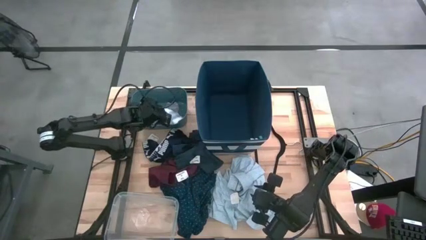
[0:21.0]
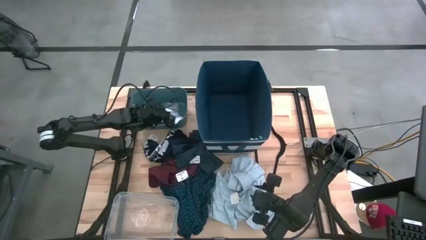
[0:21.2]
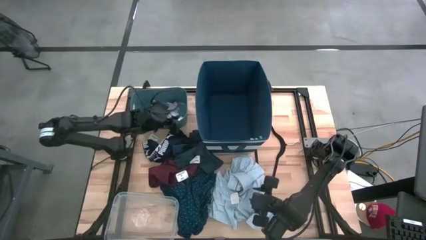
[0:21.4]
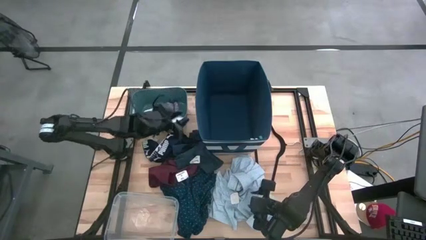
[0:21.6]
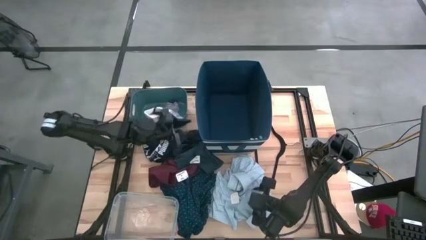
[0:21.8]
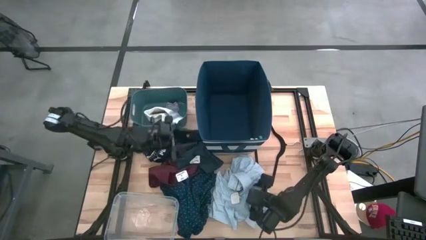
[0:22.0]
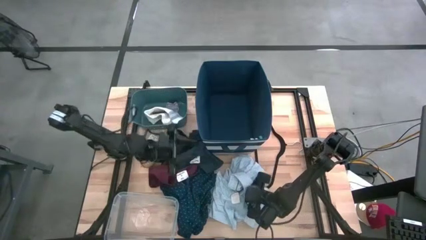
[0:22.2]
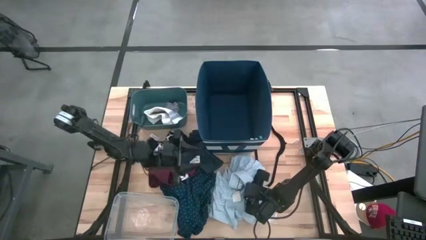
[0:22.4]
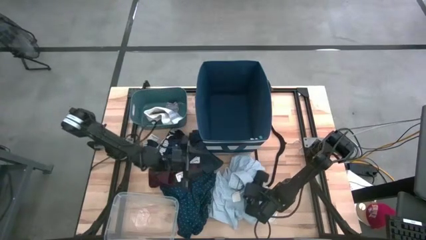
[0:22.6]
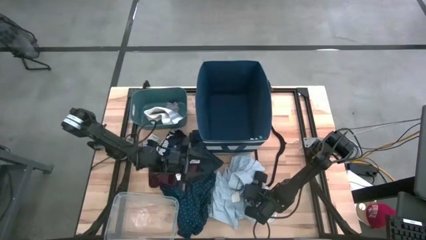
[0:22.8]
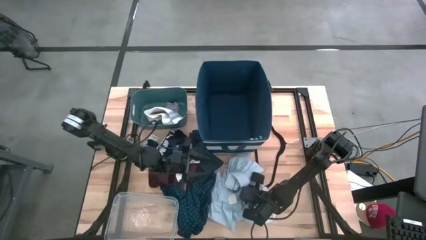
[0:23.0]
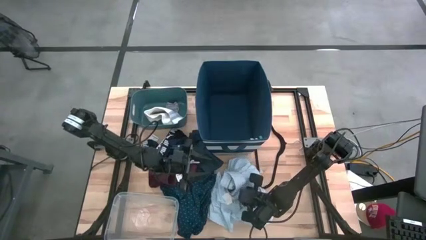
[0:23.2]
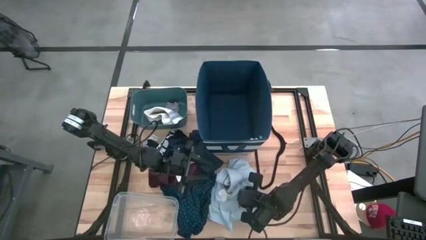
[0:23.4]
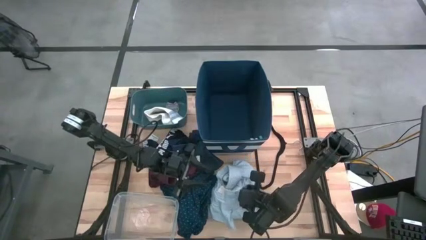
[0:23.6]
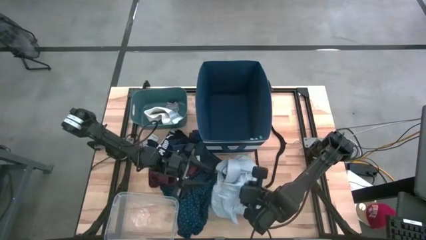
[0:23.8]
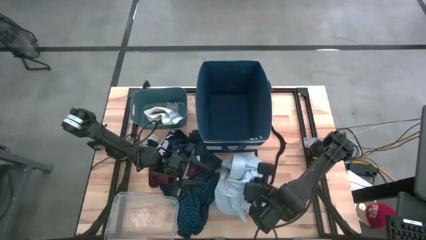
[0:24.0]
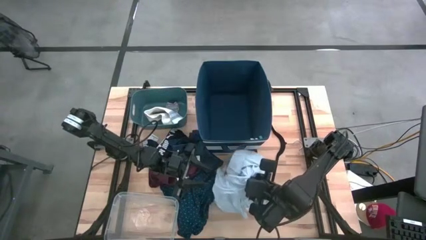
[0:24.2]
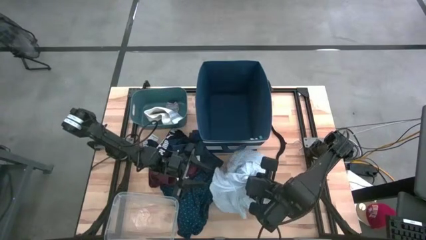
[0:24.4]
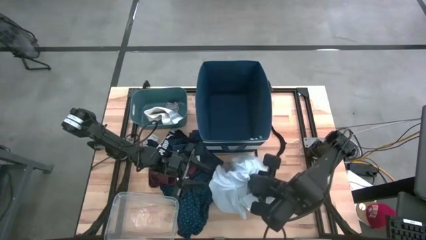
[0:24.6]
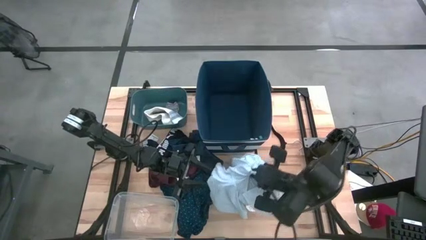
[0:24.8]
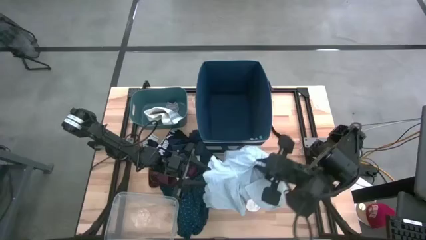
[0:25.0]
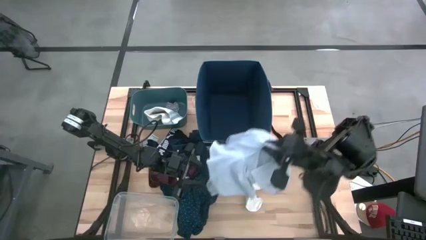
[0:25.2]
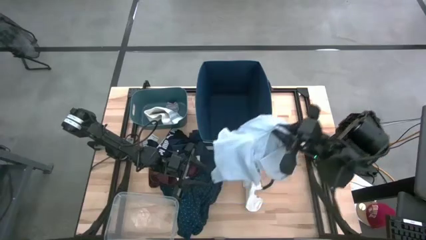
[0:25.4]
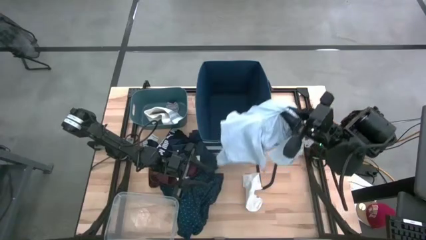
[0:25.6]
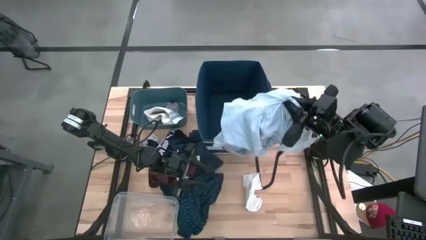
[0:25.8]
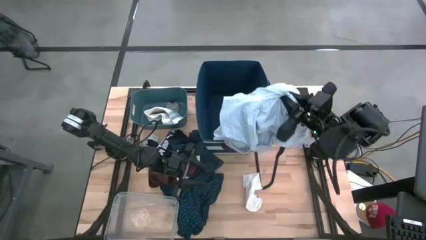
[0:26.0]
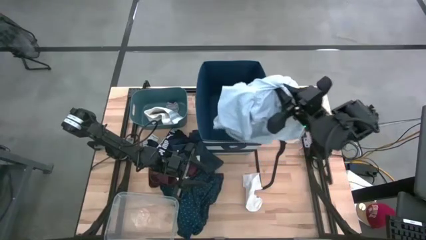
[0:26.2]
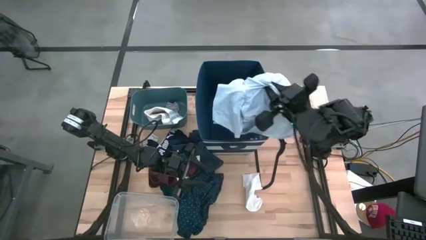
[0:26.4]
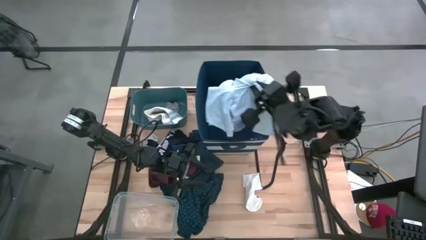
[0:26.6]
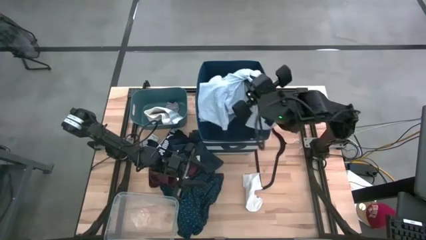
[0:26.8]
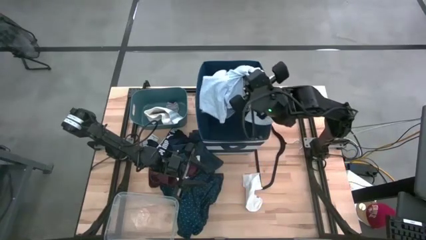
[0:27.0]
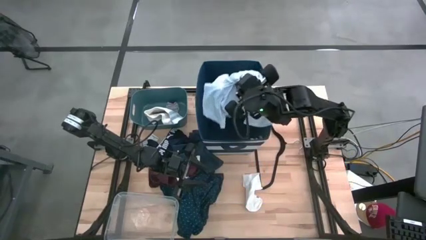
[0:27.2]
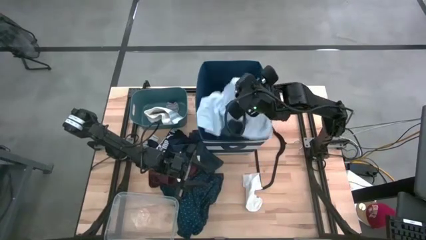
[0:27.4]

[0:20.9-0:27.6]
Task: Pick & Place Cloths
Put the light blue polo shirt into the blue laundry organizer

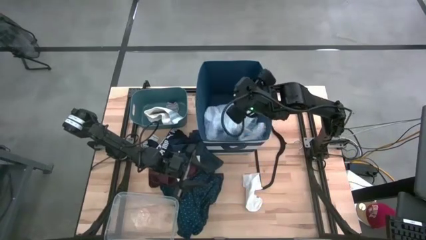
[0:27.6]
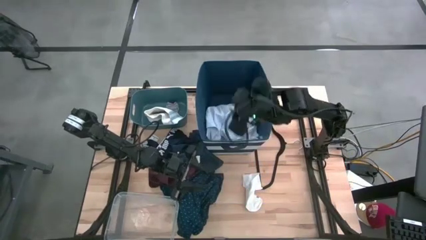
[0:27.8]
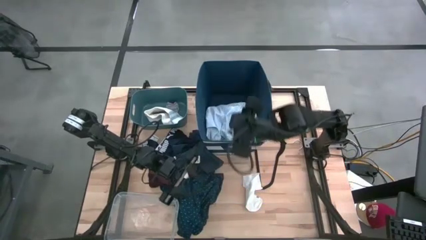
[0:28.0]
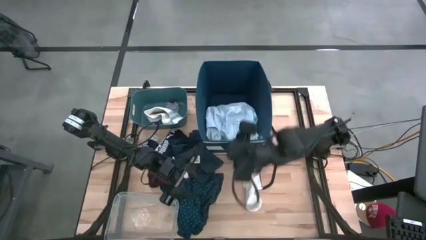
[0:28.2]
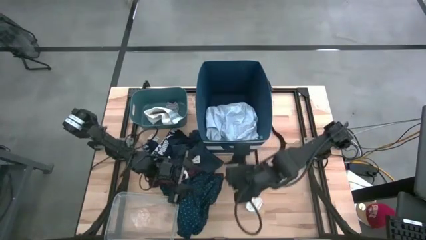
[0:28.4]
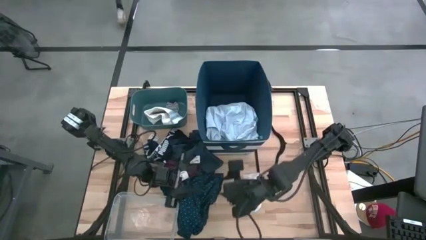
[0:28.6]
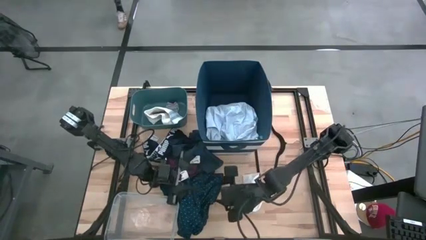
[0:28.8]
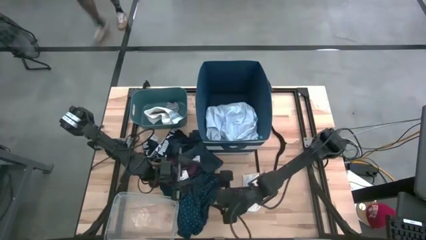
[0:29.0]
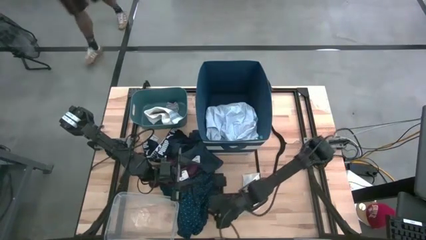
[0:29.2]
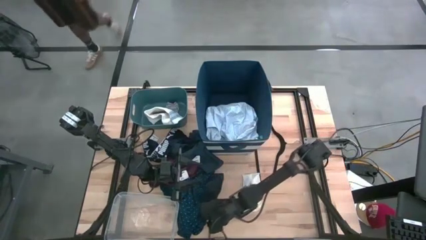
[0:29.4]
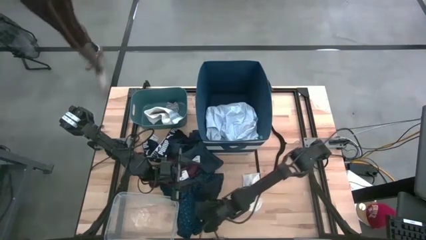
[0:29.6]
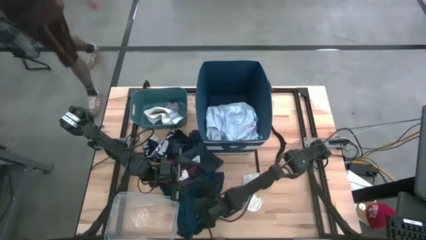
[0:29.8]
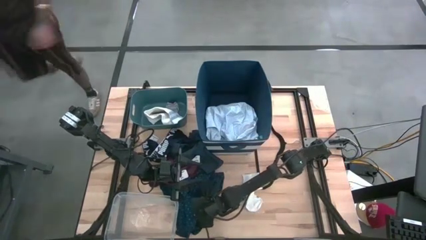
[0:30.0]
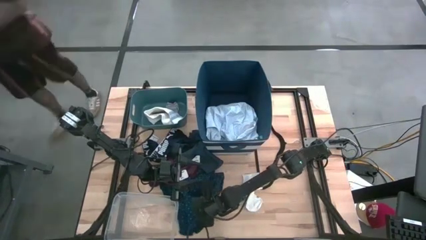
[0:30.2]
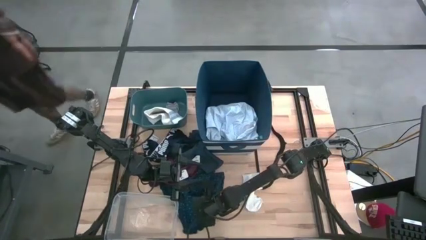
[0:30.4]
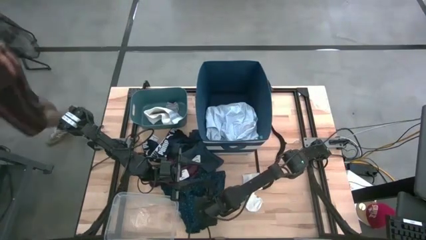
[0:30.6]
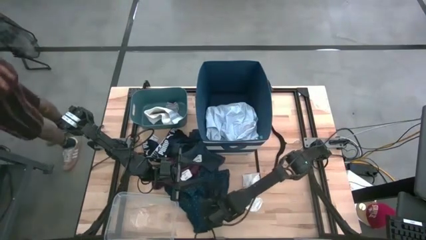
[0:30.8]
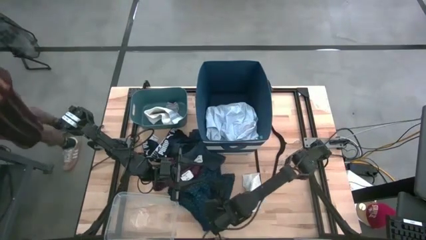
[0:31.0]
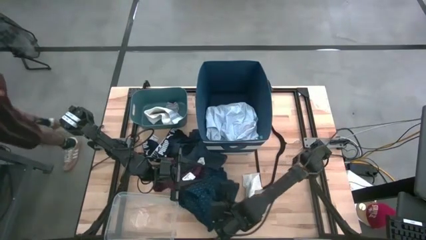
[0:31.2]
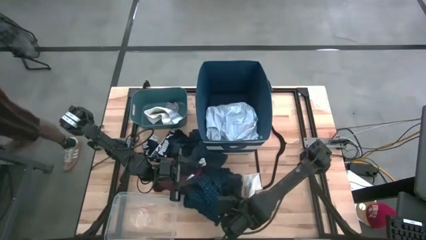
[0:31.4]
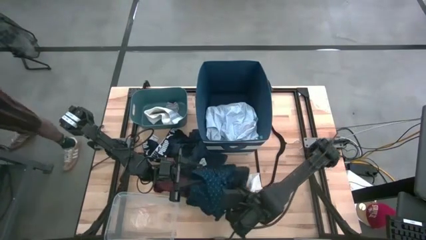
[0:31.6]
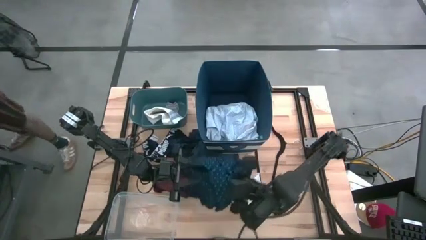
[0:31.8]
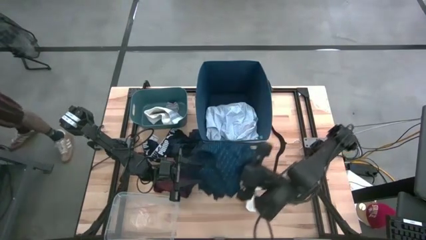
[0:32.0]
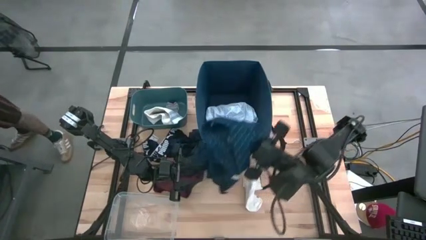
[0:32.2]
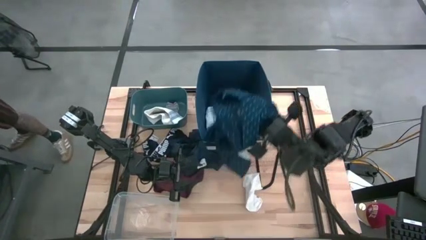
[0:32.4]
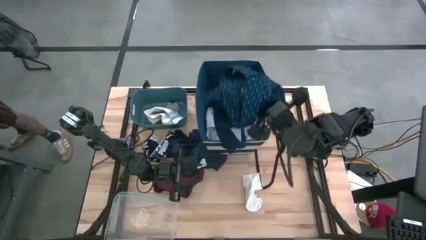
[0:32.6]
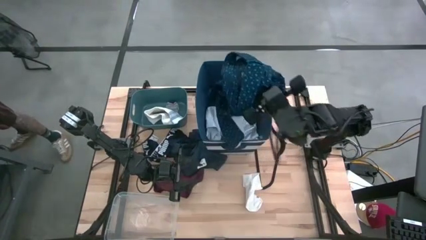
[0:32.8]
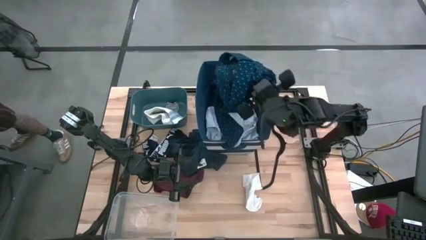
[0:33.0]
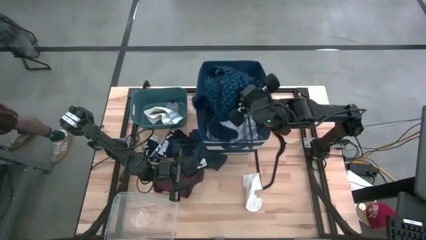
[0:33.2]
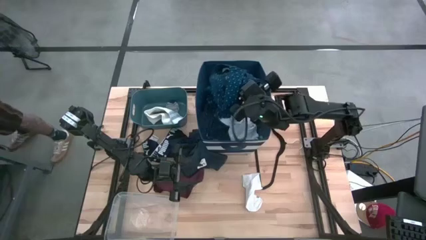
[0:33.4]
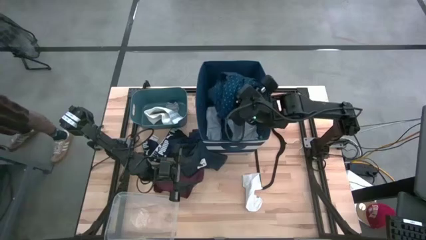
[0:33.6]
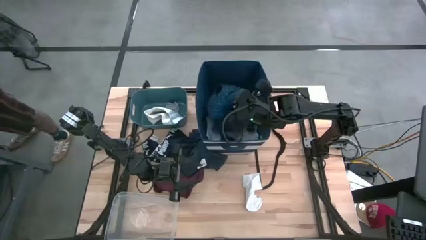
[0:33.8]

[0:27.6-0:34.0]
Put the dark blue polo shirt into the blue laundry organizer
